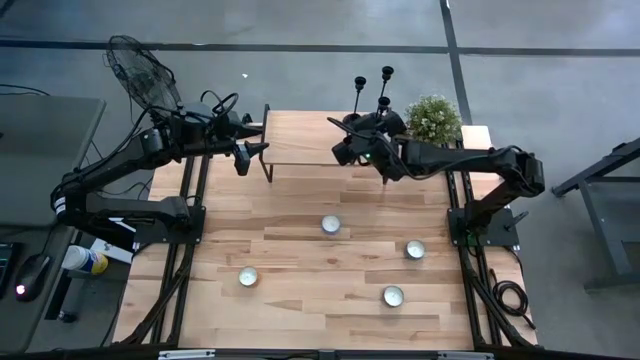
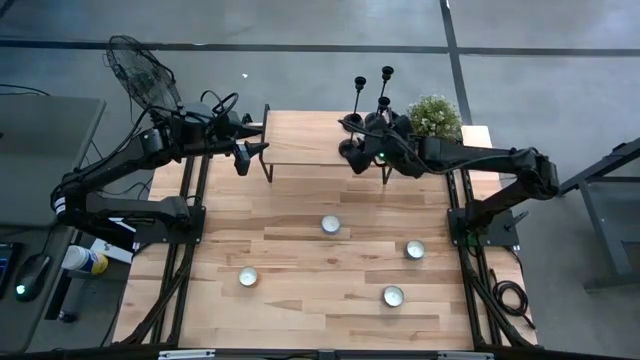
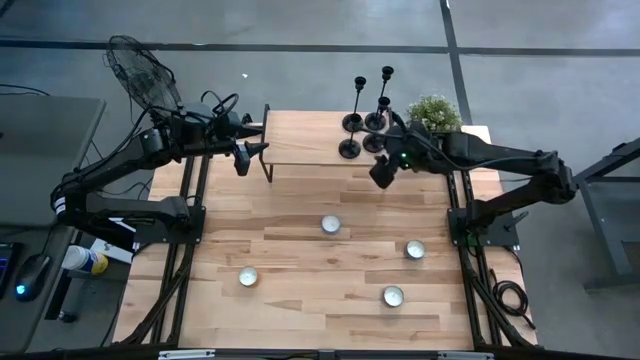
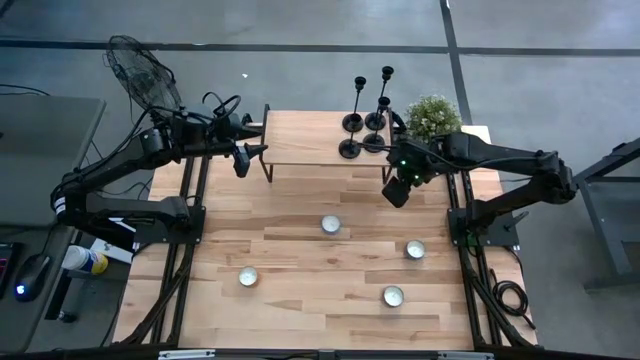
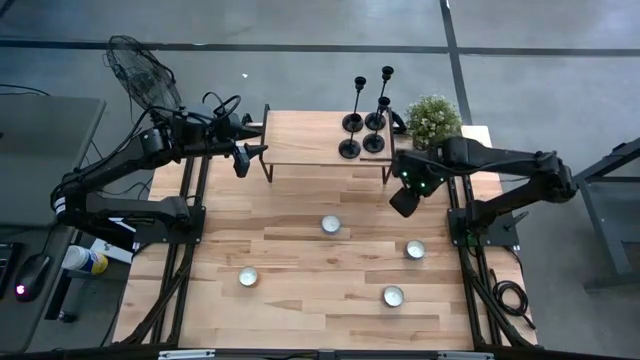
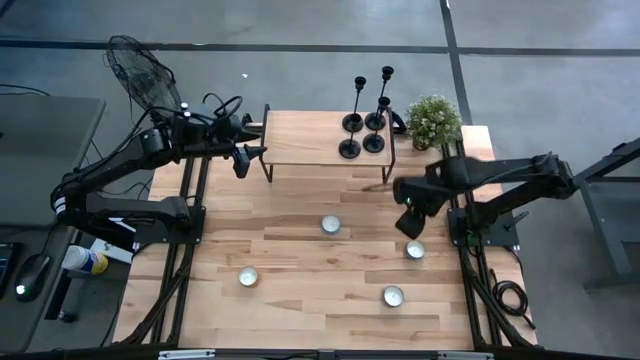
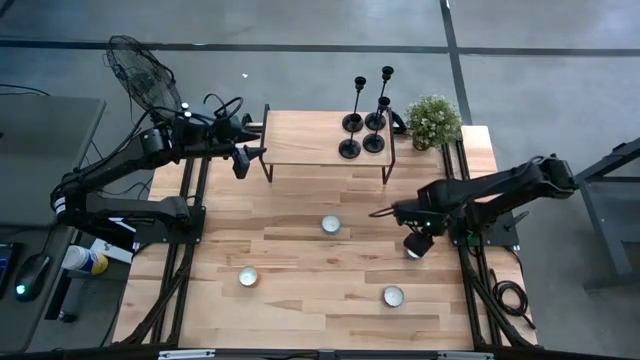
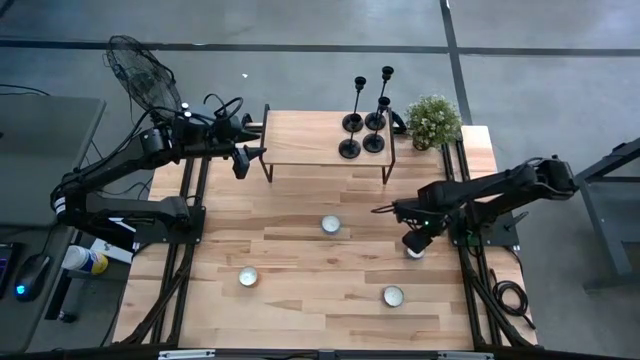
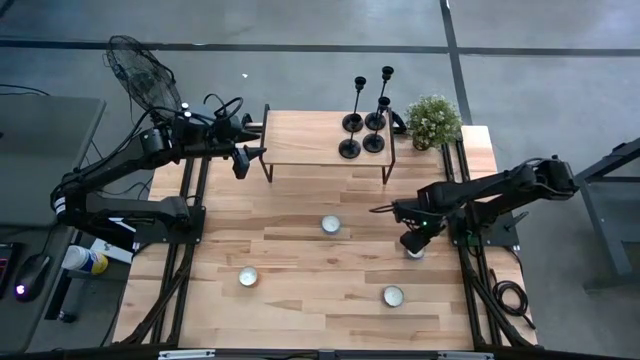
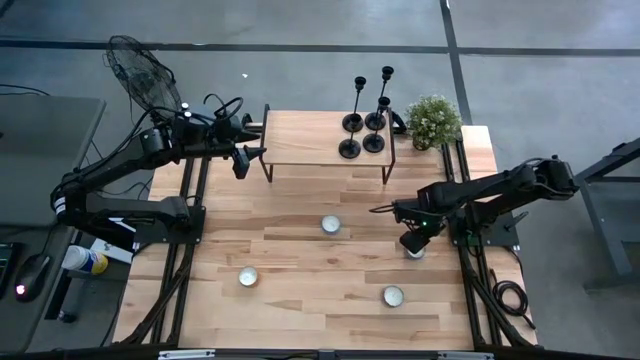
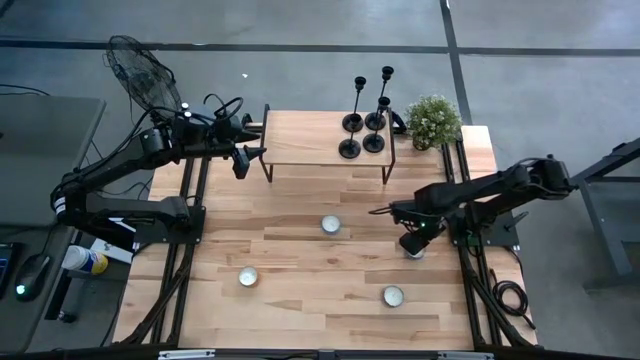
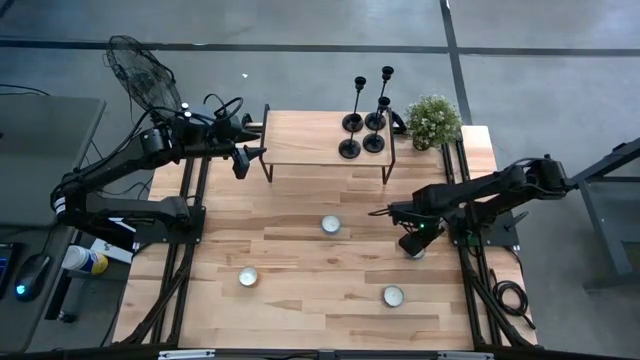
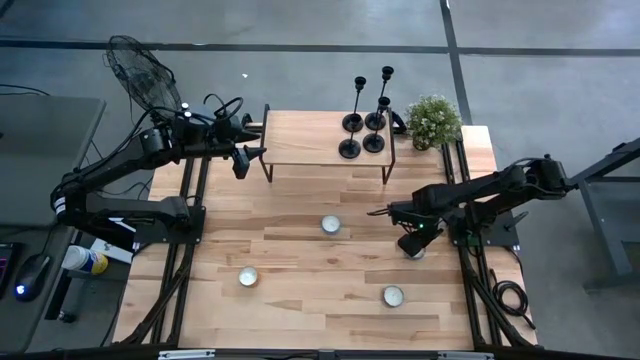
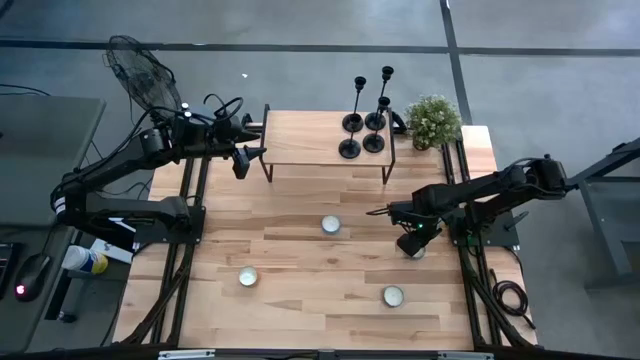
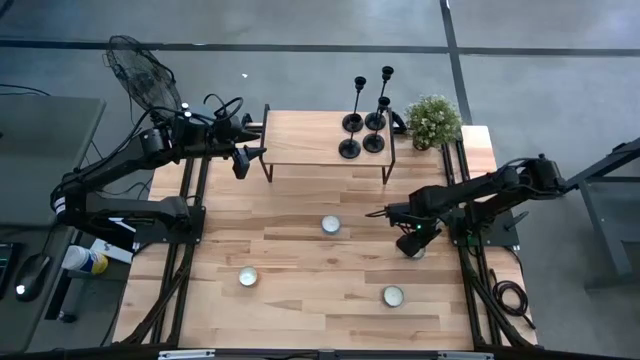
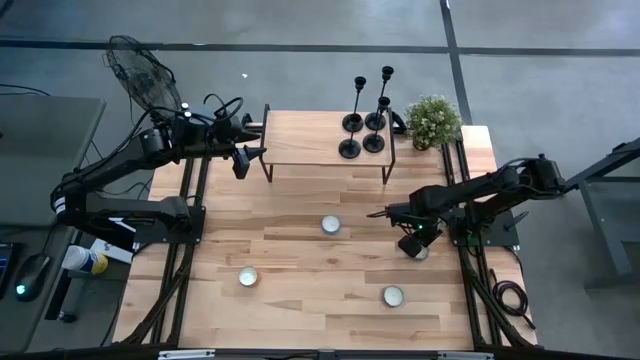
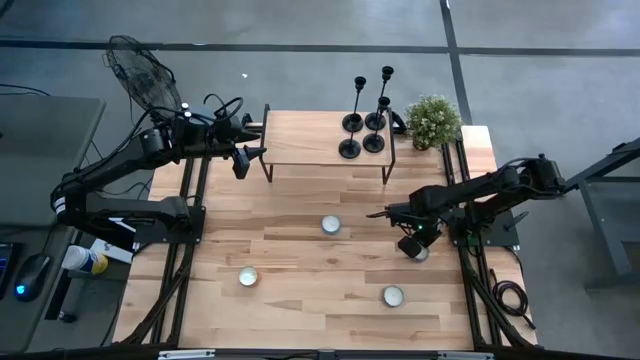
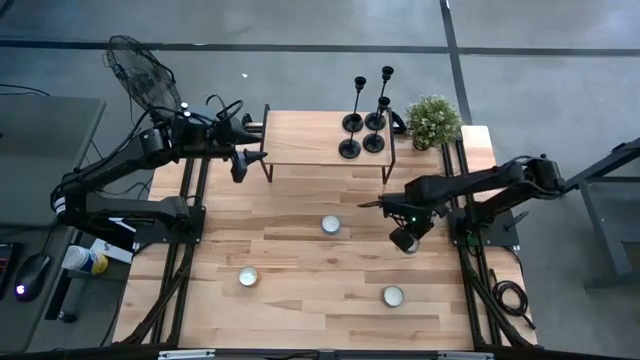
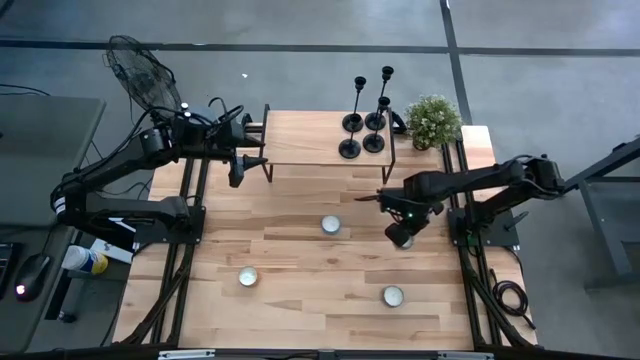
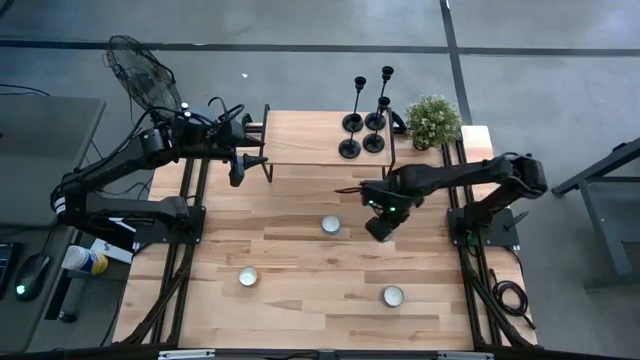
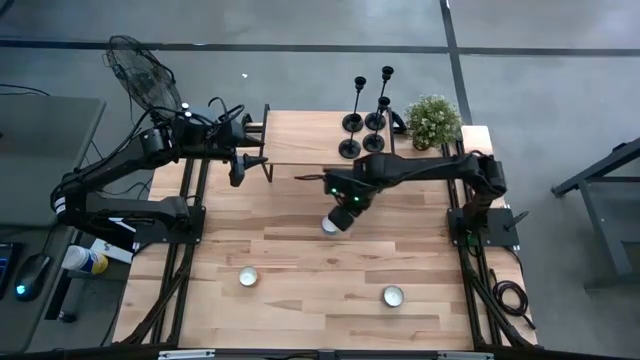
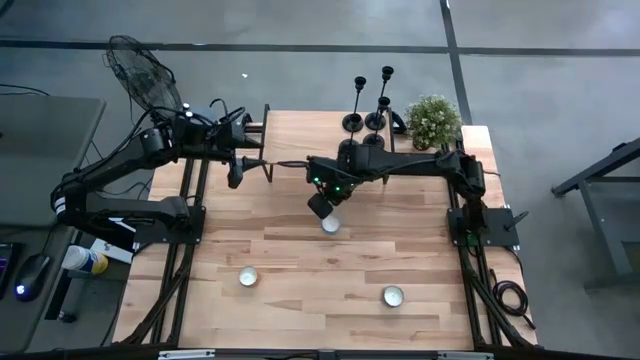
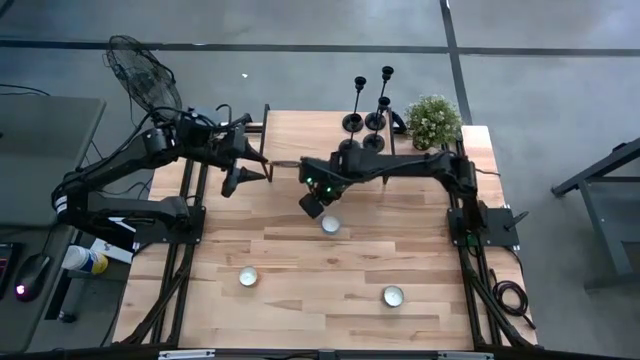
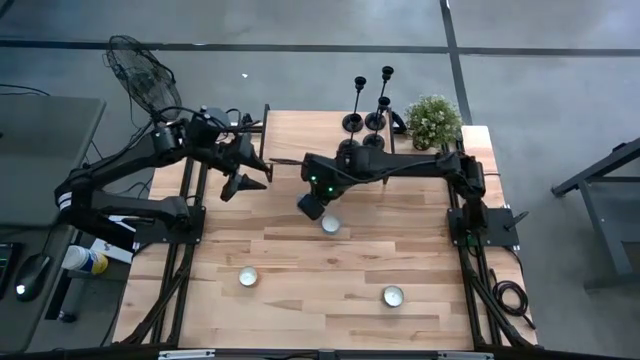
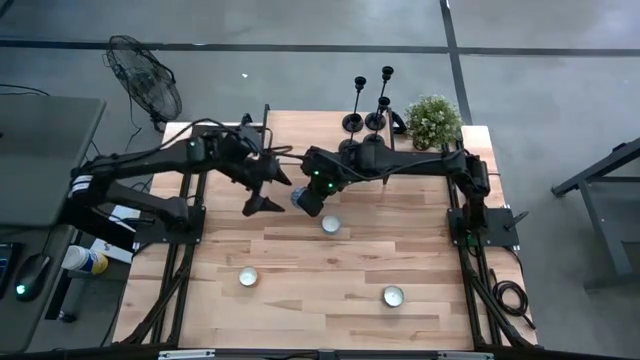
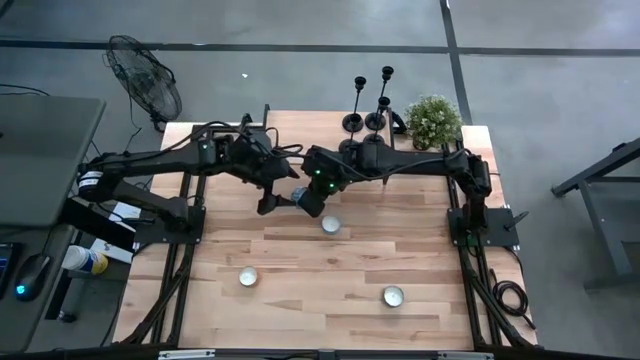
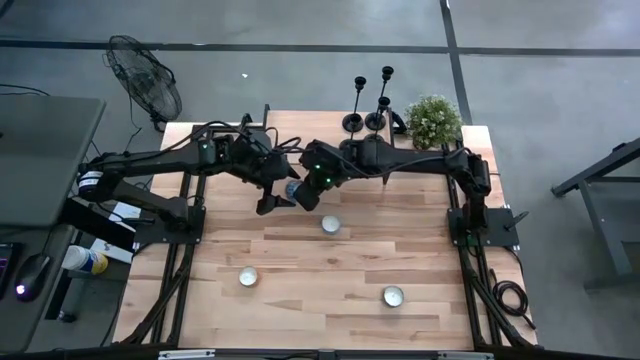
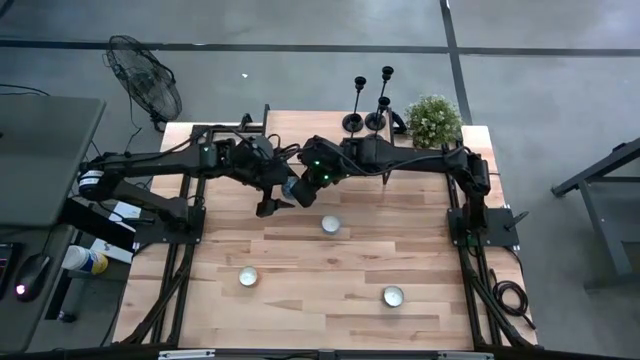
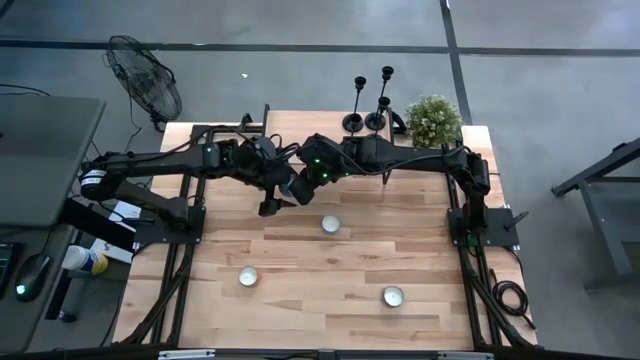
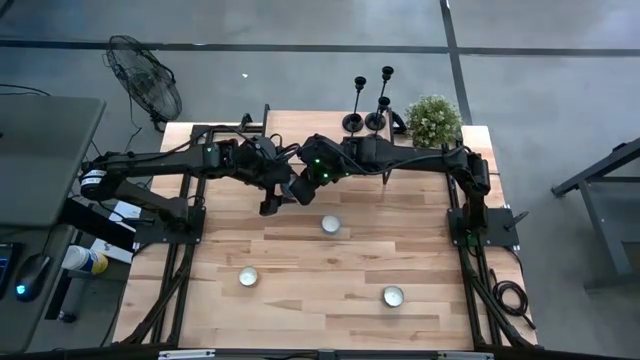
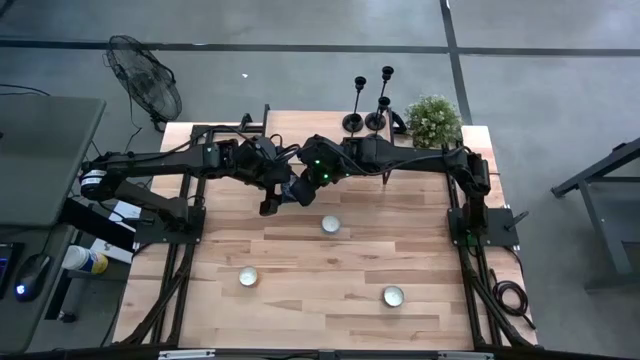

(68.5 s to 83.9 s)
Task: Pick & Place candle stick holders
Put the blue scented candle on the shelf

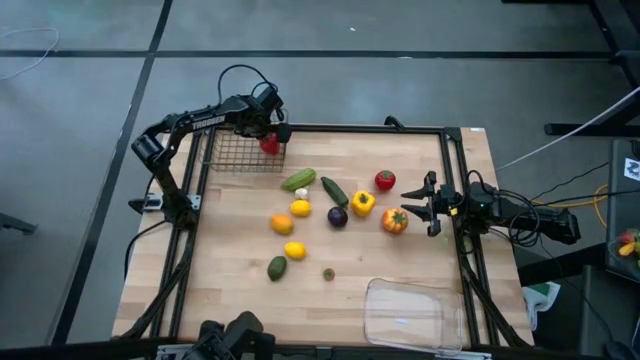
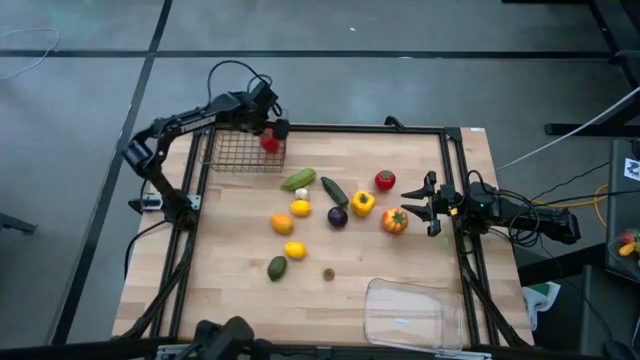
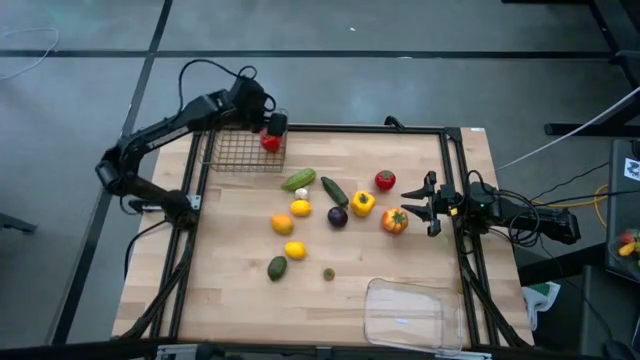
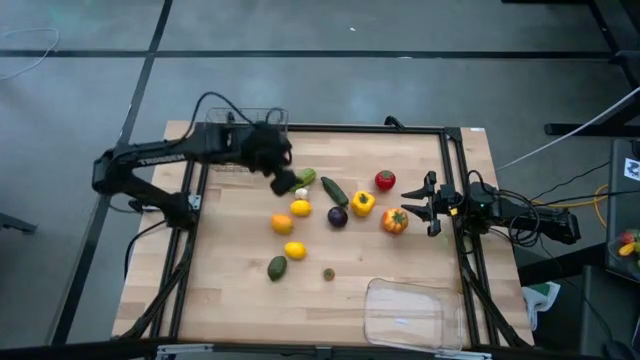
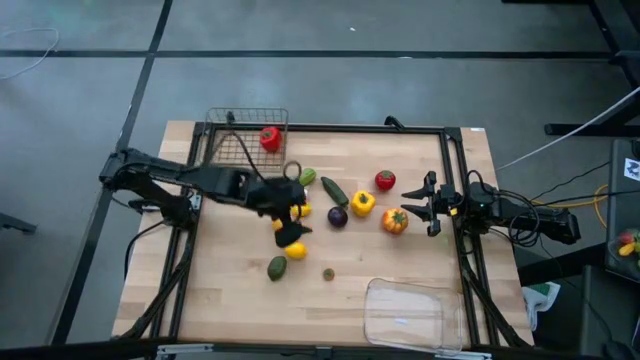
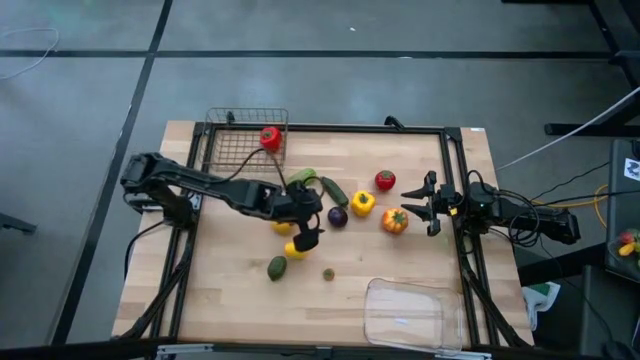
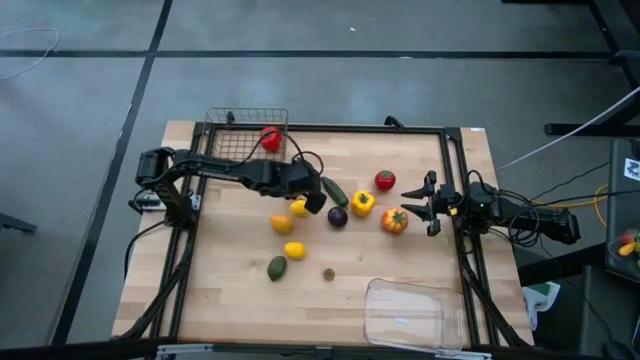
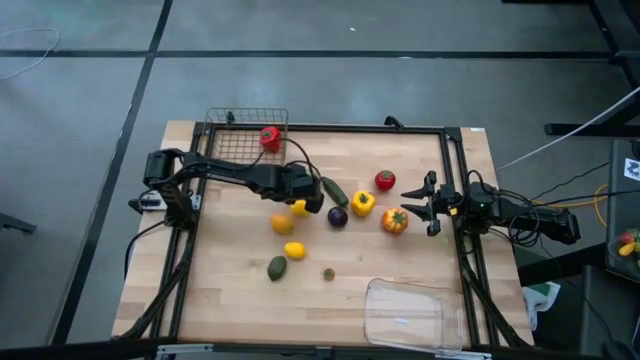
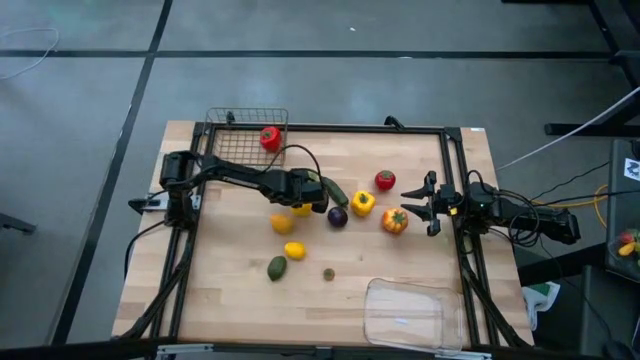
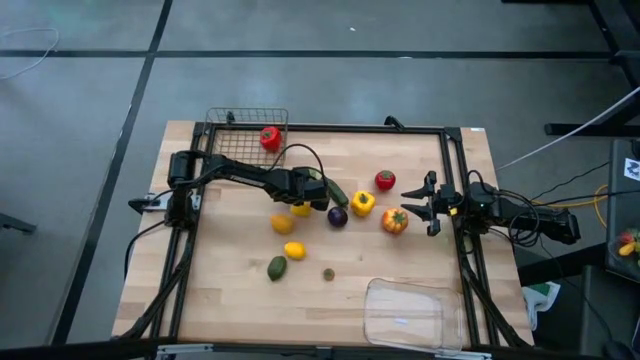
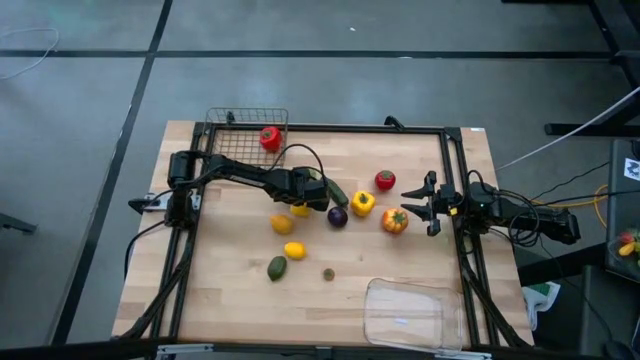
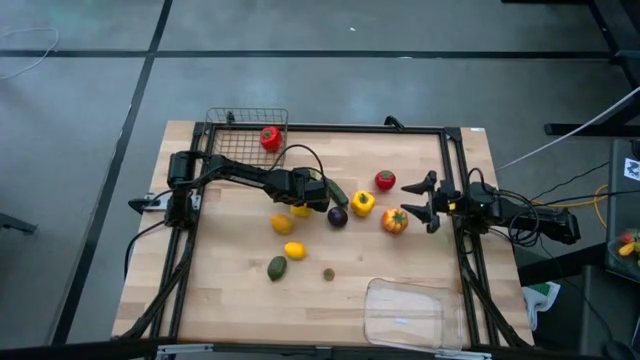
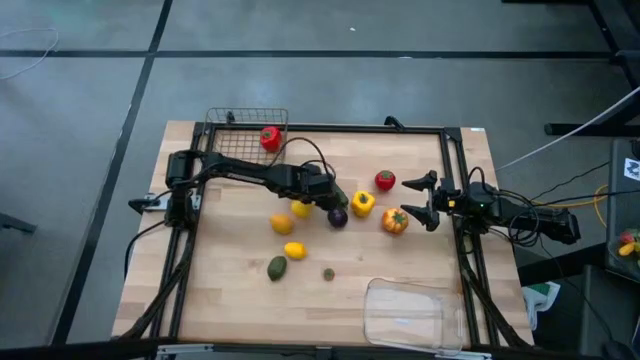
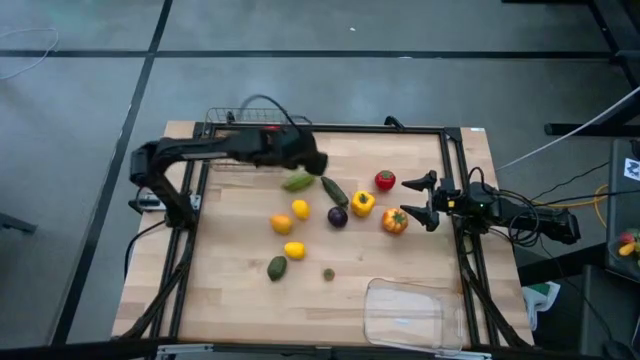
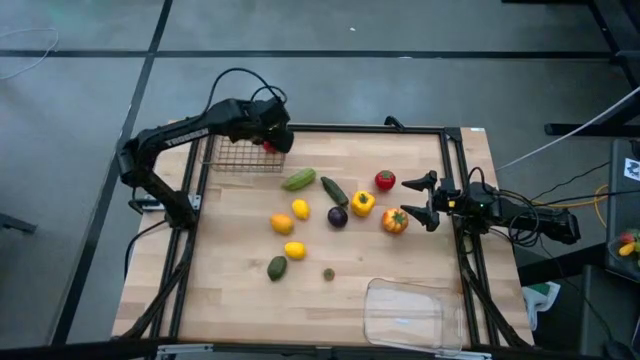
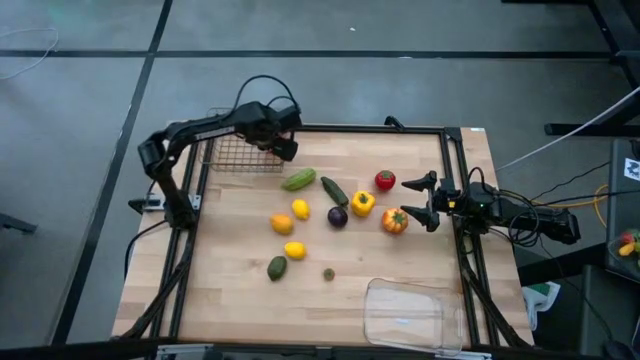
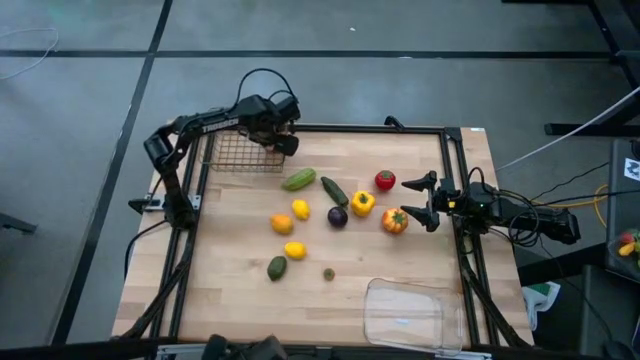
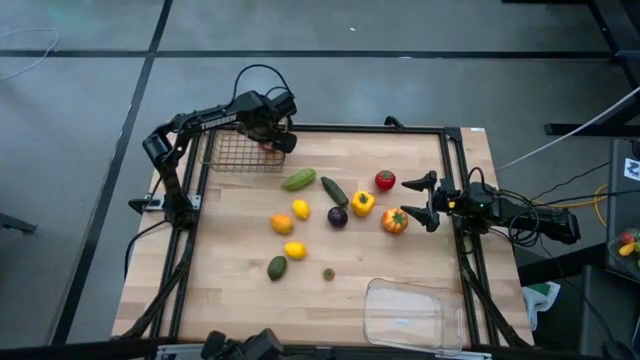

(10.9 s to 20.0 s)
Task: Sort produce into baskets
Put the garlic into the mesh basket
